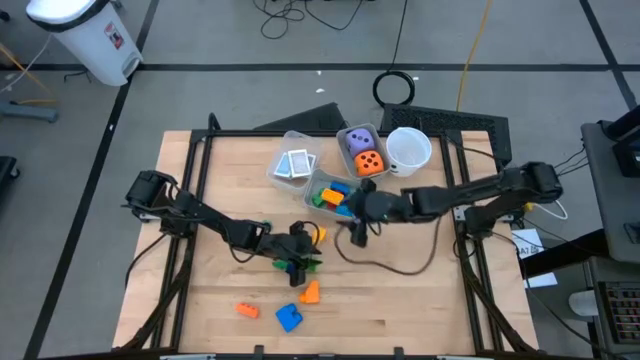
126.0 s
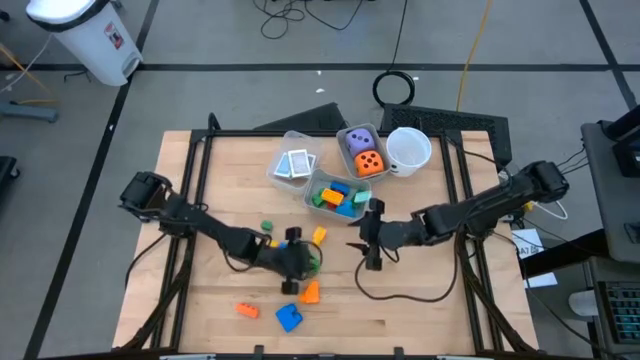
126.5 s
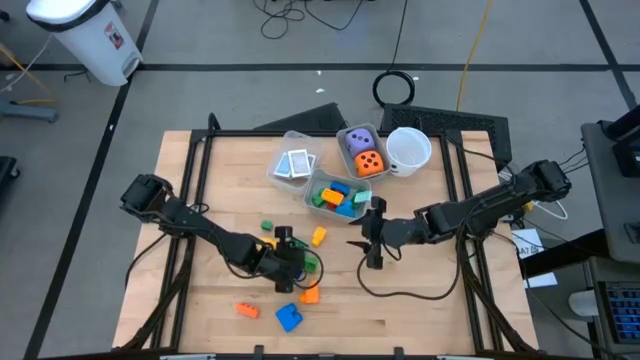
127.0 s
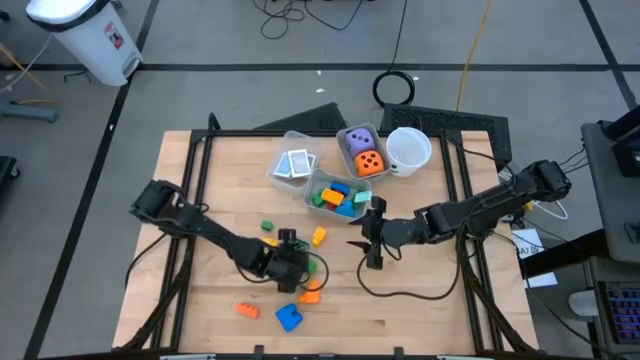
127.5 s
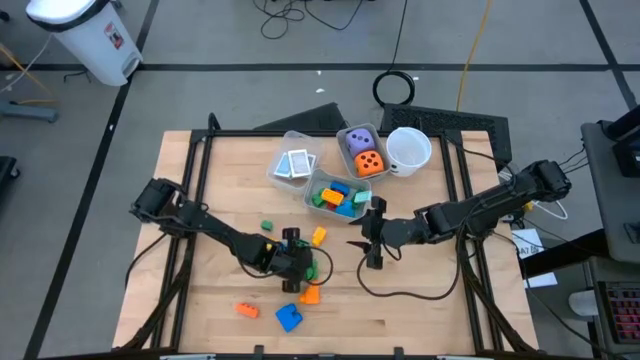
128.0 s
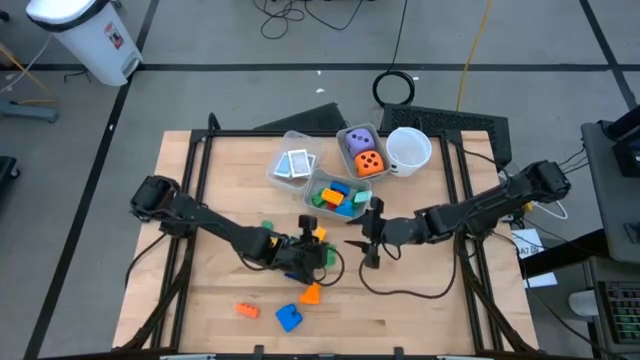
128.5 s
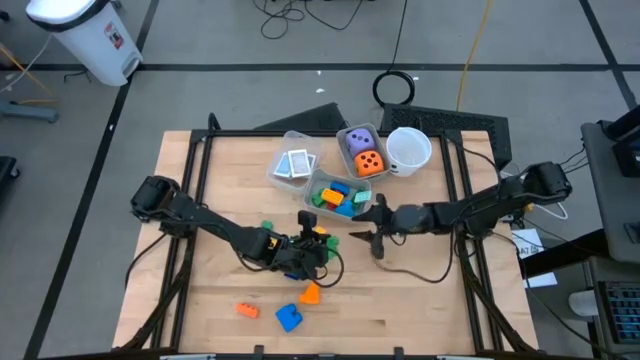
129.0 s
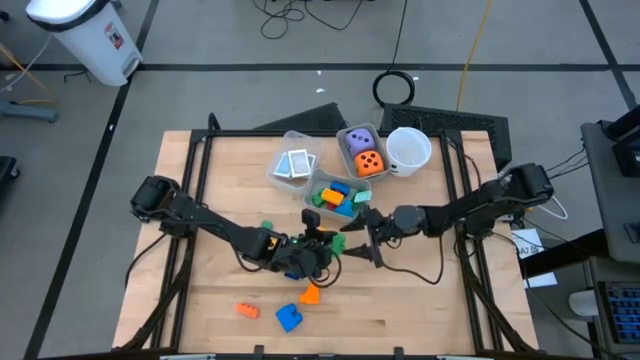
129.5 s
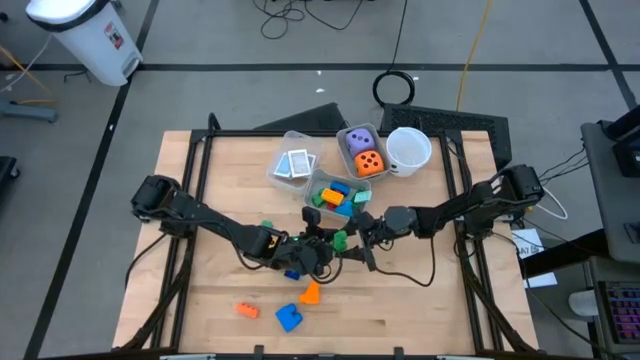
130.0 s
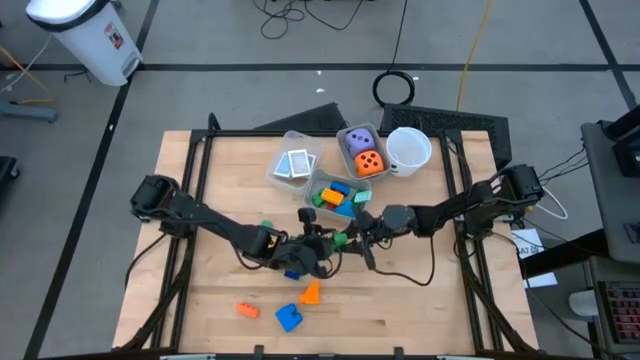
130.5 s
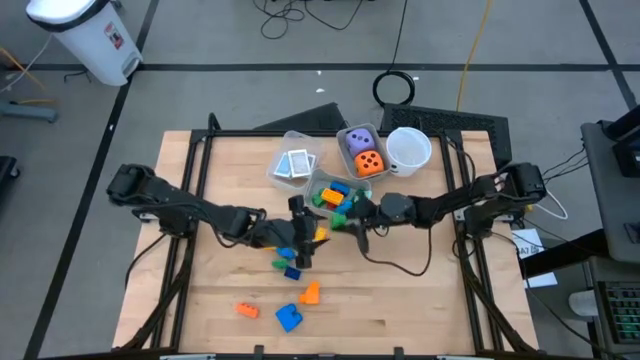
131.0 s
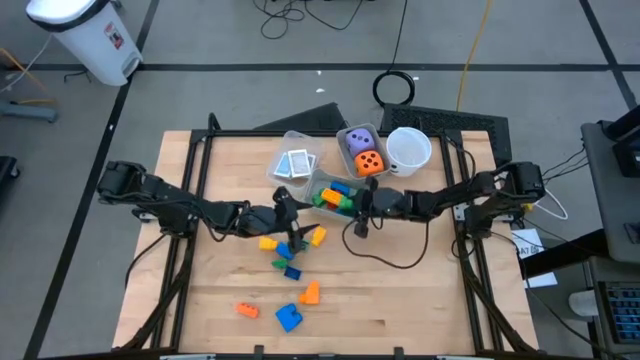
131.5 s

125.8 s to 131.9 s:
Task: Pick & Place Toys
Put the green game piece into the bottom gray bin

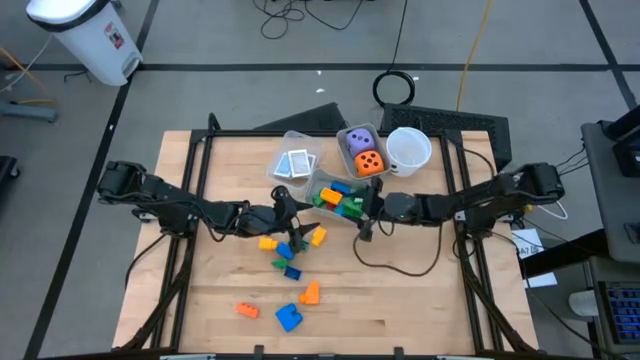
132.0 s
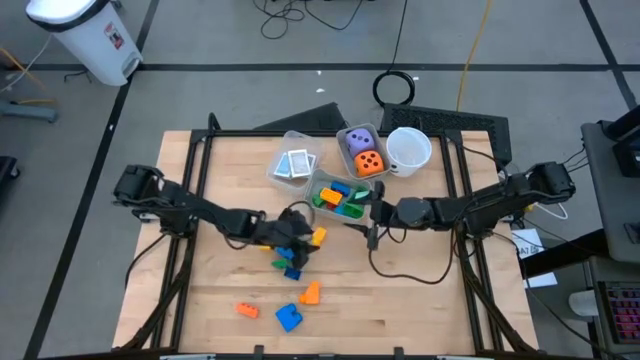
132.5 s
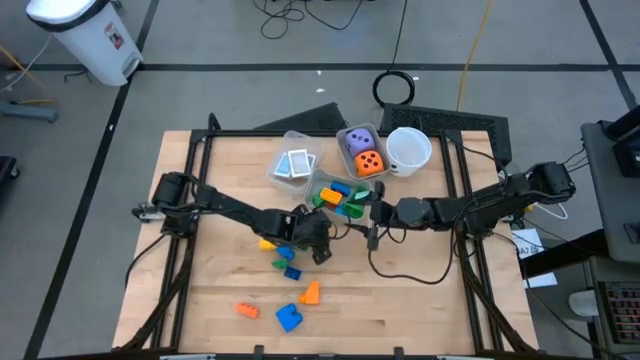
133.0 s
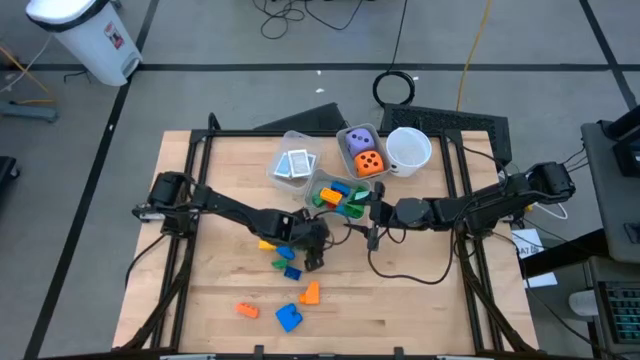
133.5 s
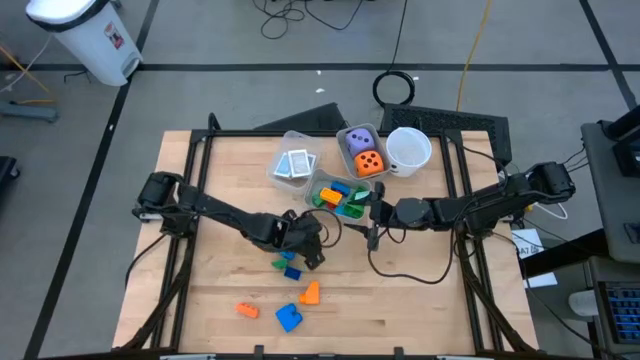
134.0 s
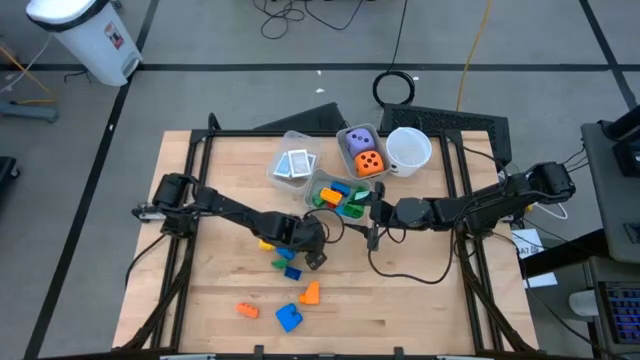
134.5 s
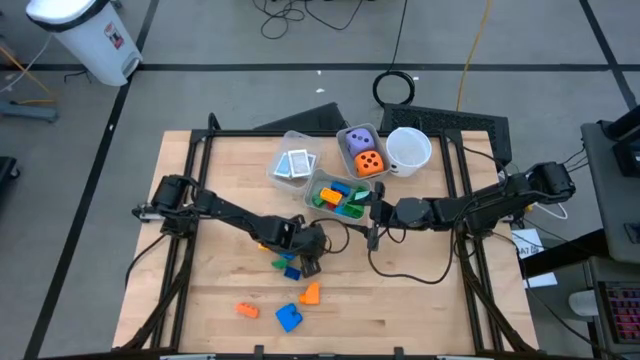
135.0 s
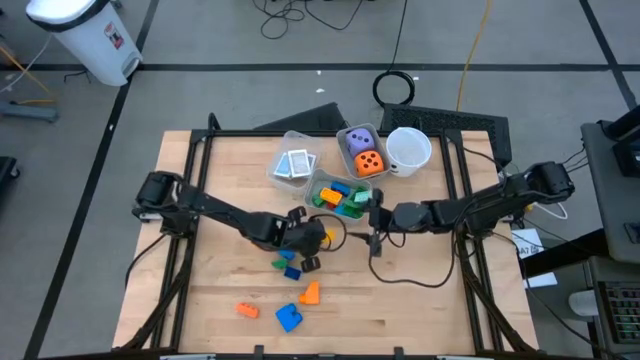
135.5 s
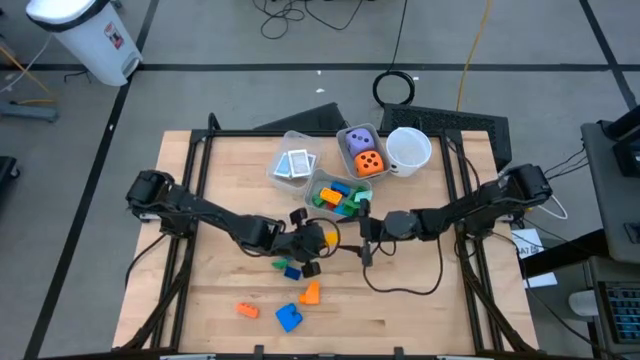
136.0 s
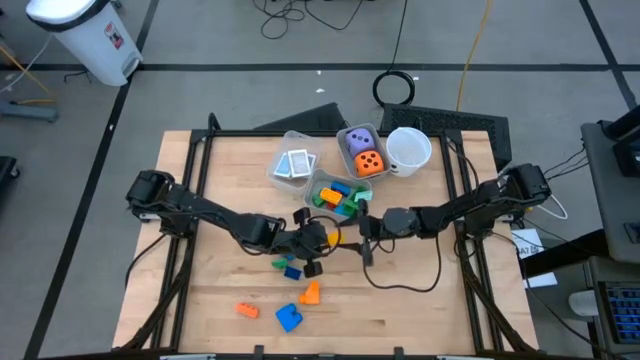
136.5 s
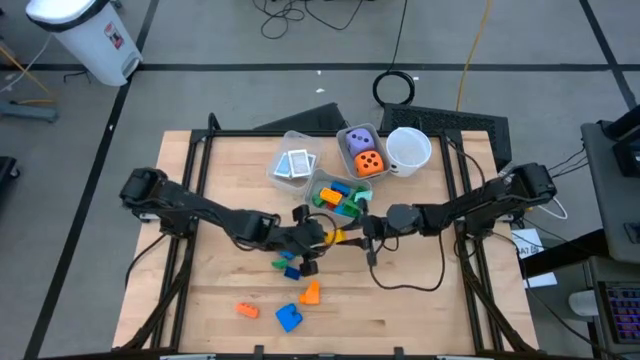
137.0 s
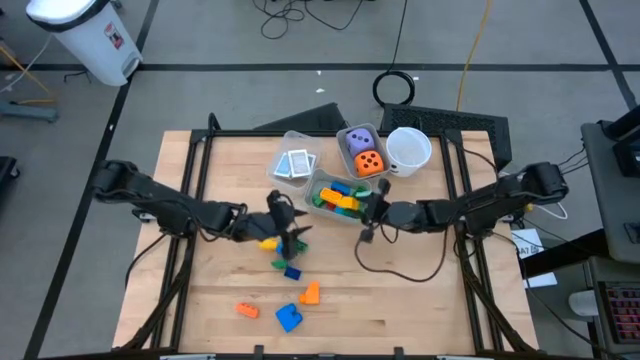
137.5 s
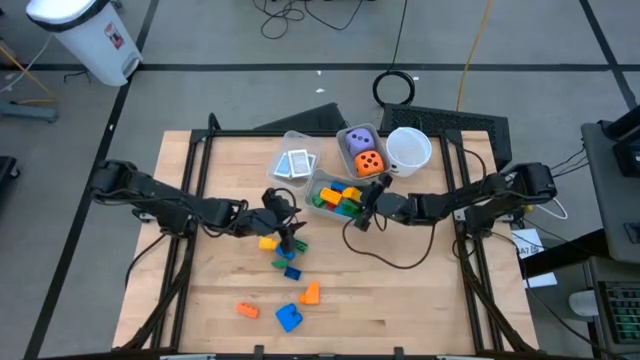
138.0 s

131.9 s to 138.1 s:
Put the yellow game piece into the bottom gray bin

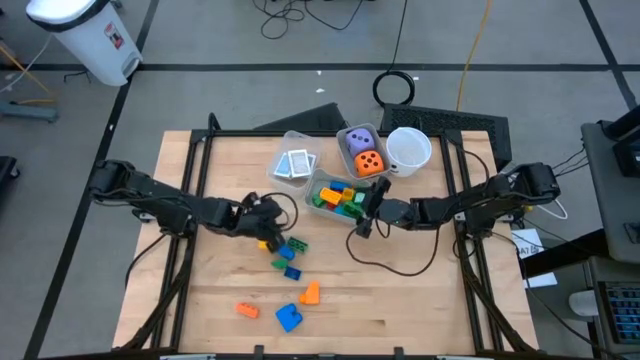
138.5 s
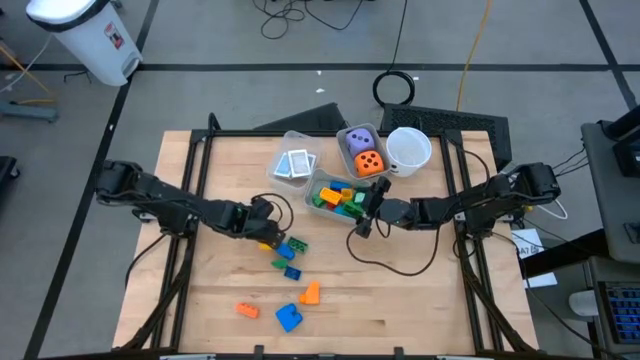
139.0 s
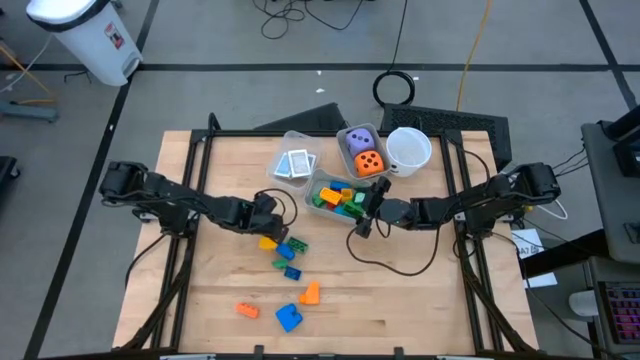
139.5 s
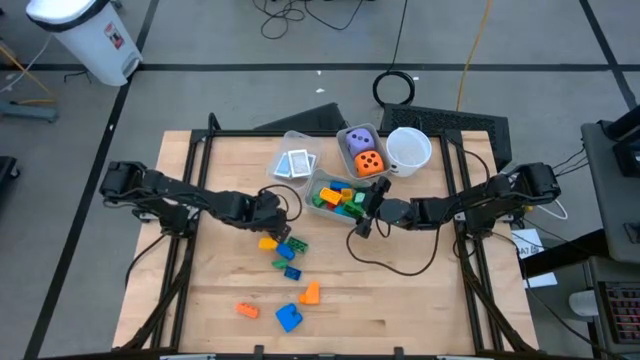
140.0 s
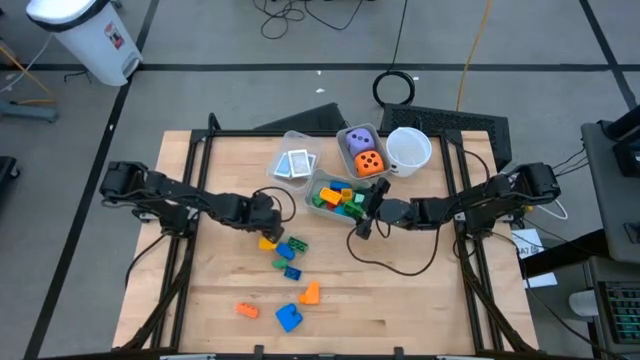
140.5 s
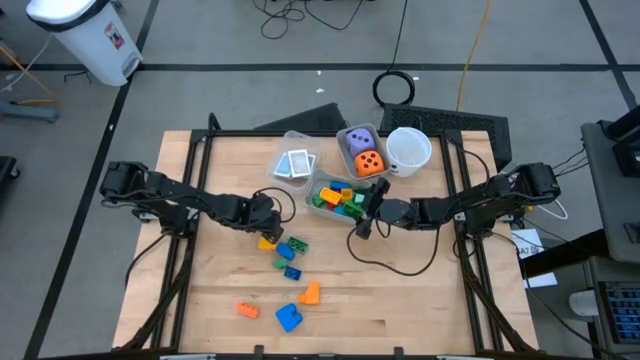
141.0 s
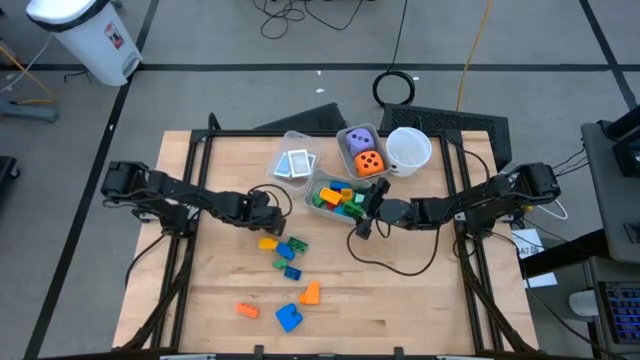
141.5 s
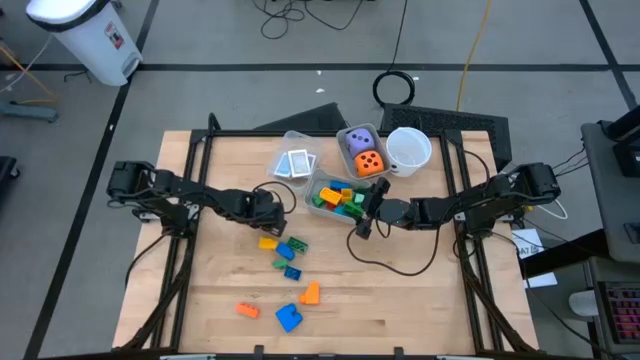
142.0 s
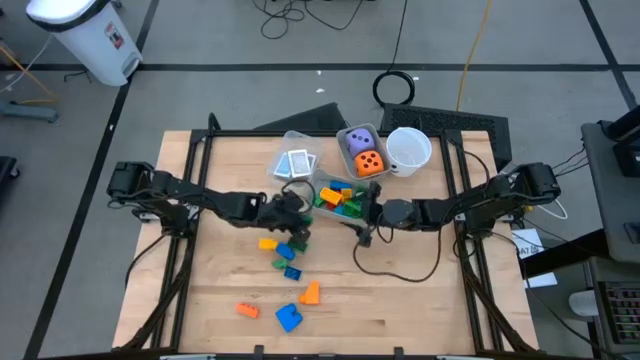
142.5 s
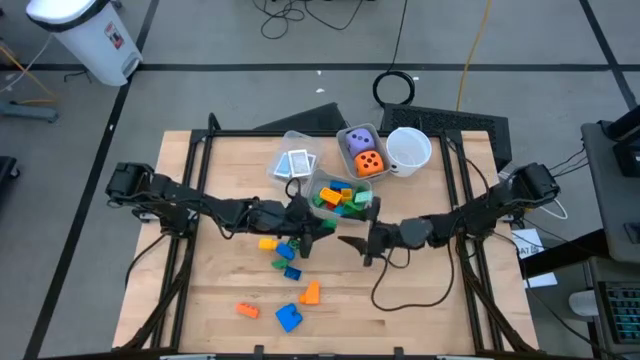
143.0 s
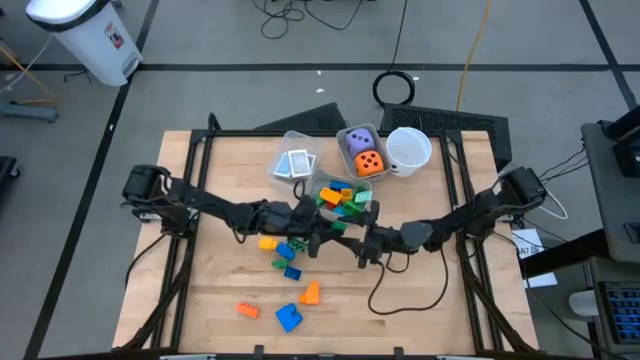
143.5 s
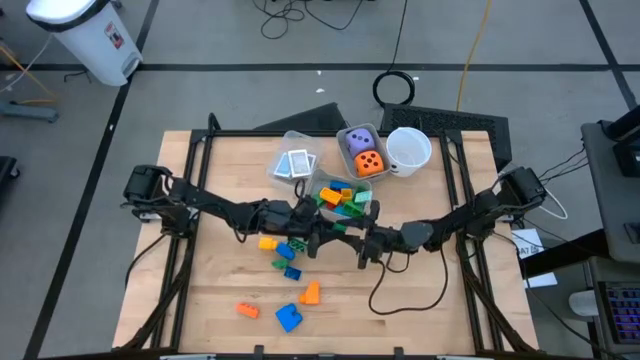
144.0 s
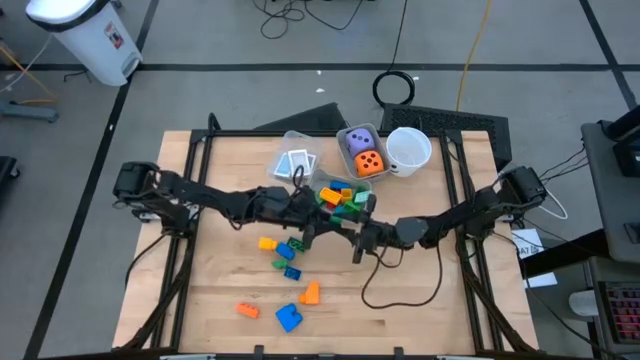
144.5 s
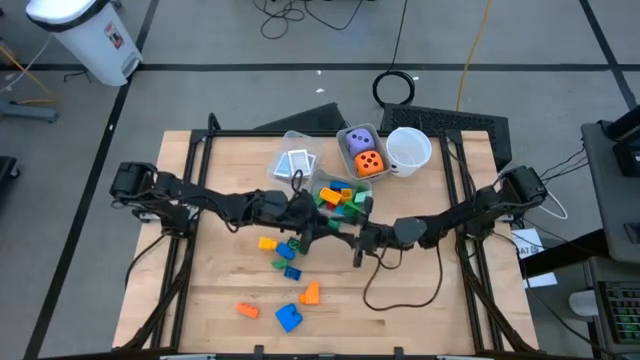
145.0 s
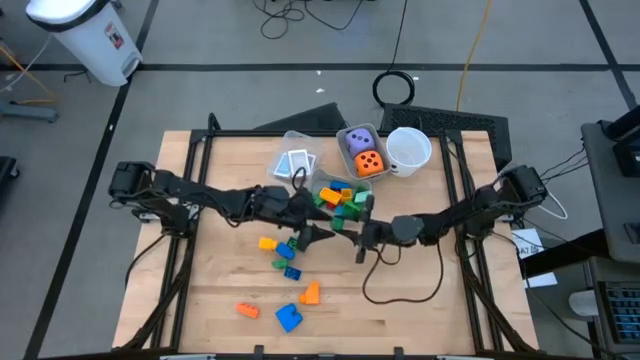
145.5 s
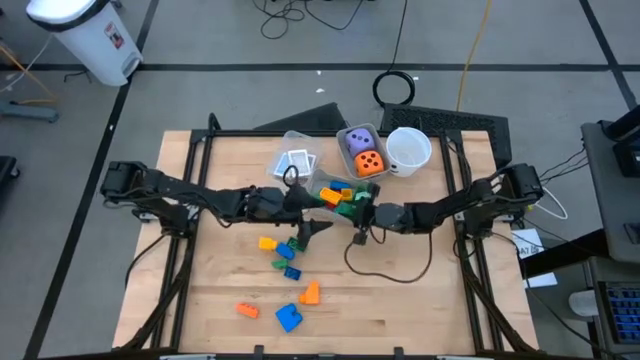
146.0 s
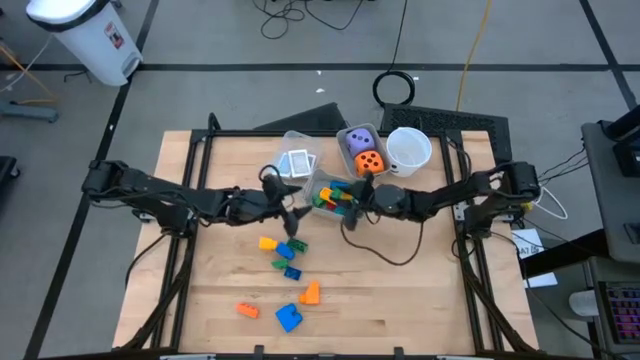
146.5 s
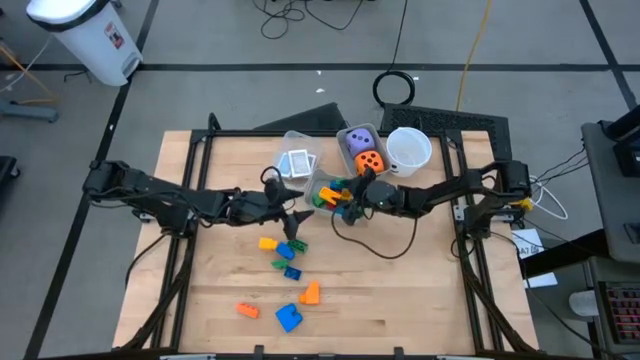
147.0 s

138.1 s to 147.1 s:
Put the green game piece into the bottom gray bin
